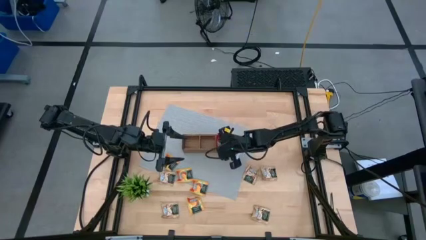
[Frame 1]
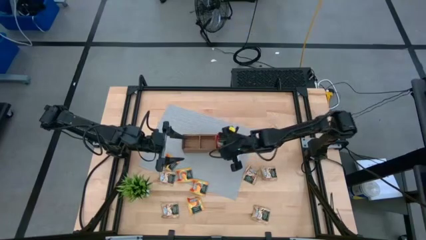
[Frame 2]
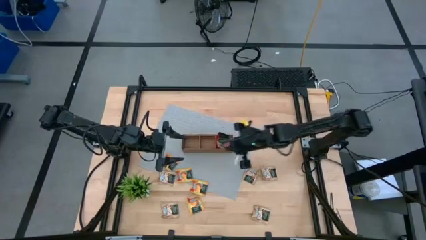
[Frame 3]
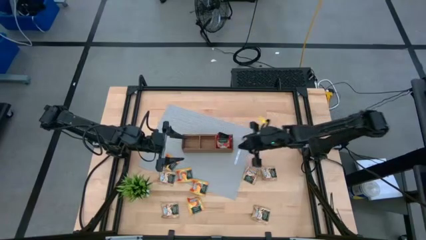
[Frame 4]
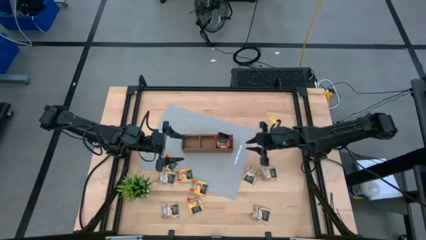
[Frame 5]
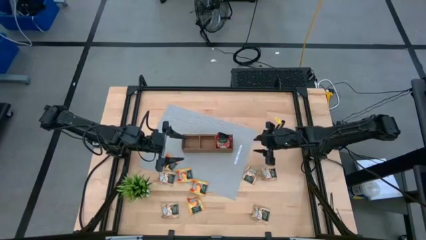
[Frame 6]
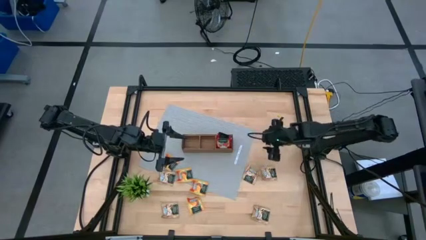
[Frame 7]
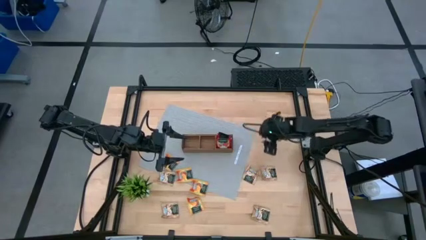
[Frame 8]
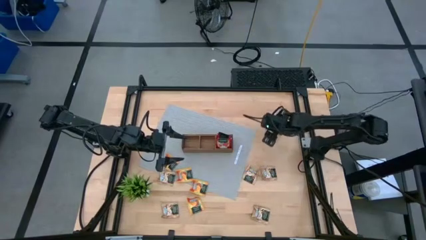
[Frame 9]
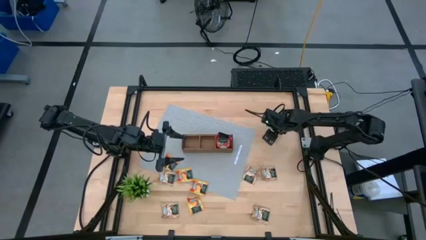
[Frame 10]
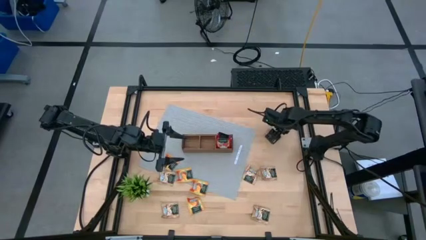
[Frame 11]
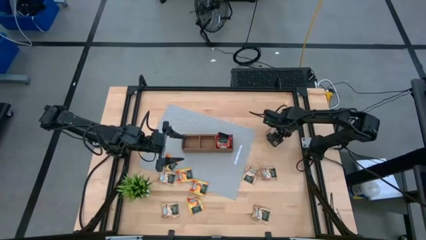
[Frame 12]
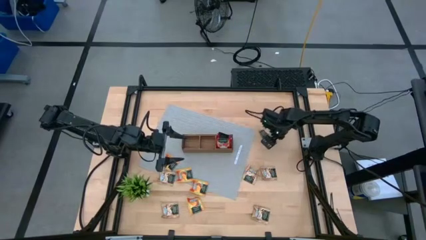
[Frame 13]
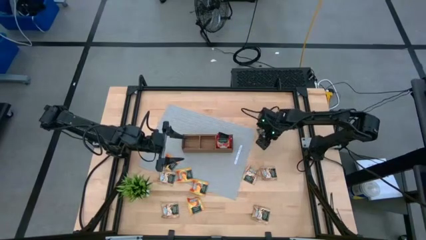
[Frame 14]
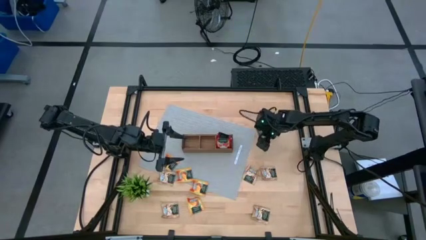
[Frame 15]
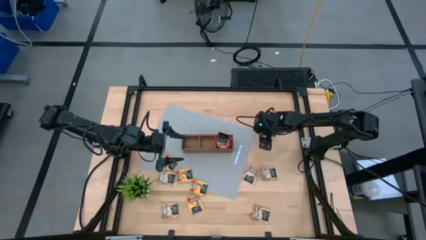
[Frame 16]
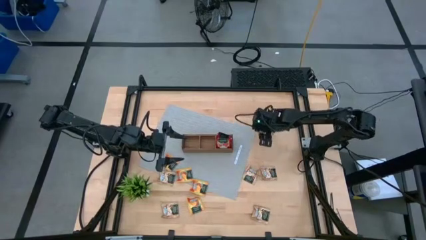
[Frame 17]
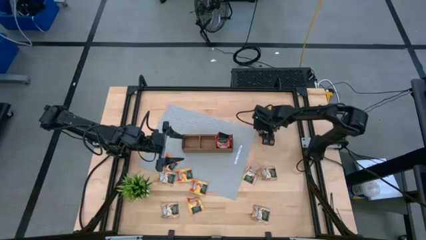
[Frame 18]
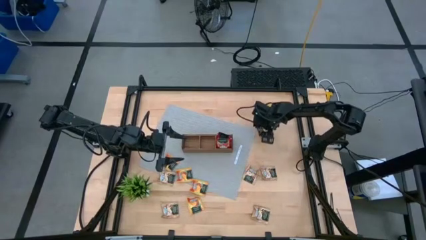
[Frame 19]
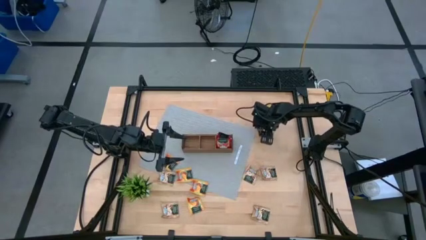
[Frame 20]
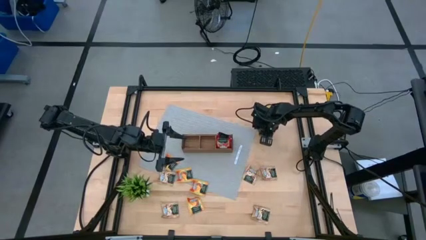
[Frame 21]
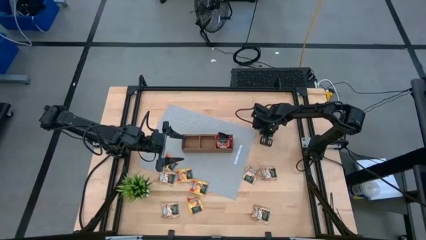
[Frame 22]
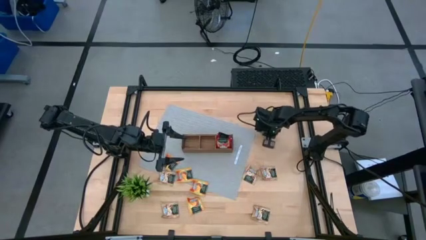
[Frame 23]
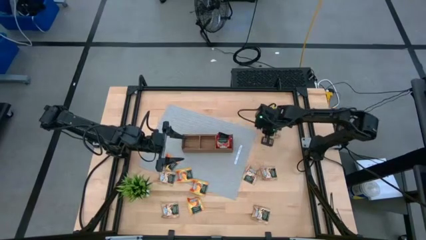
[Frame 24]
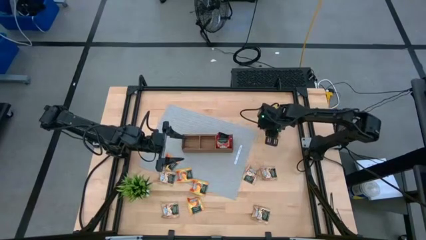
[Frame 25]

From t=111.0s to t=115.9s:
Task: Pick & Place Tea
Put the brown tea bag into the wooden organizer

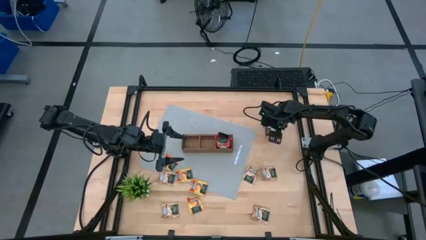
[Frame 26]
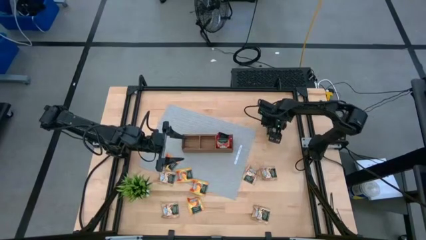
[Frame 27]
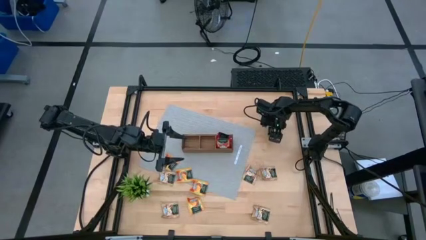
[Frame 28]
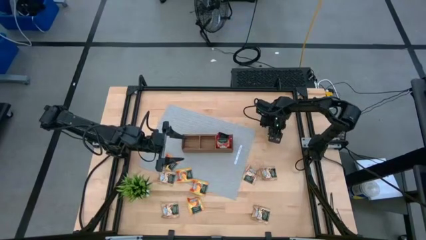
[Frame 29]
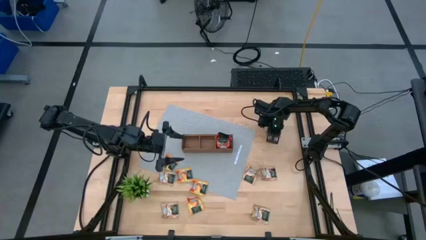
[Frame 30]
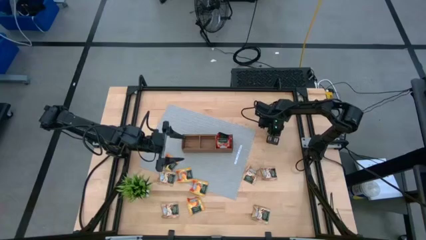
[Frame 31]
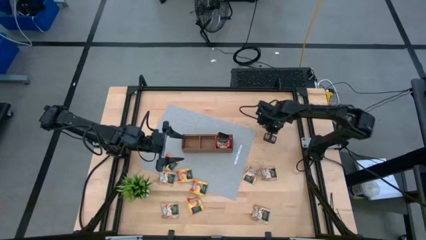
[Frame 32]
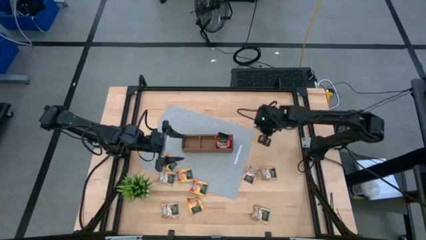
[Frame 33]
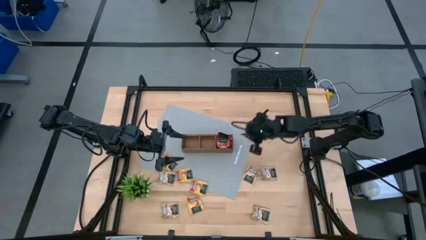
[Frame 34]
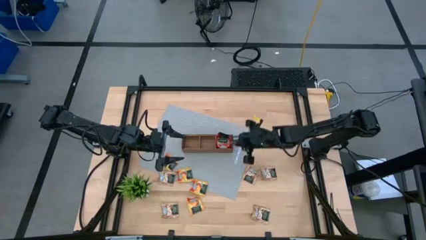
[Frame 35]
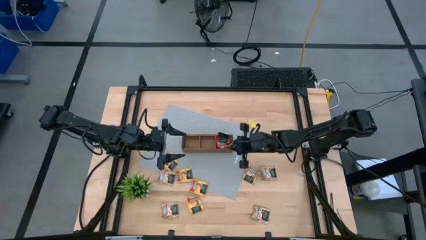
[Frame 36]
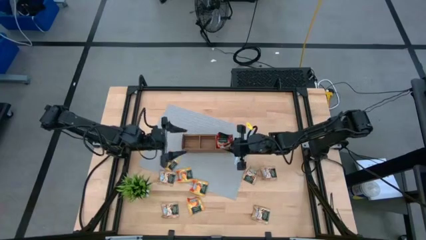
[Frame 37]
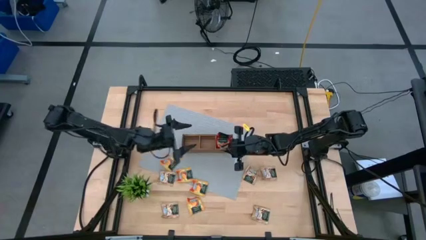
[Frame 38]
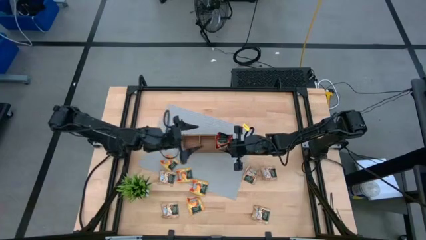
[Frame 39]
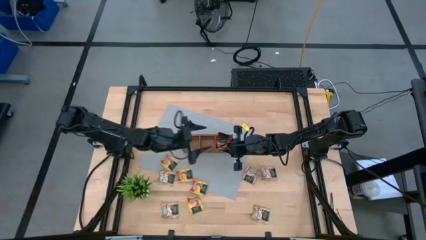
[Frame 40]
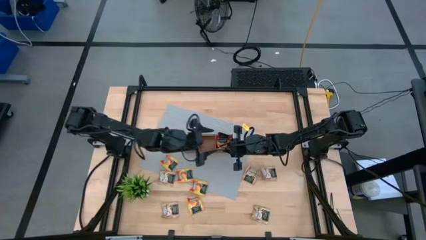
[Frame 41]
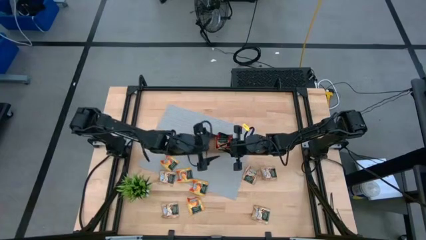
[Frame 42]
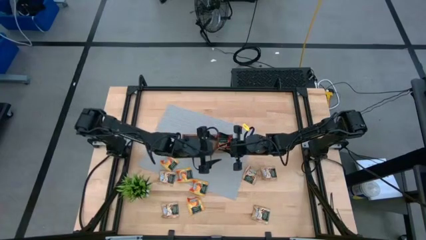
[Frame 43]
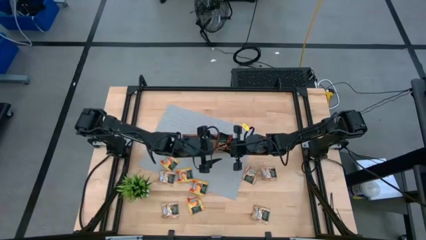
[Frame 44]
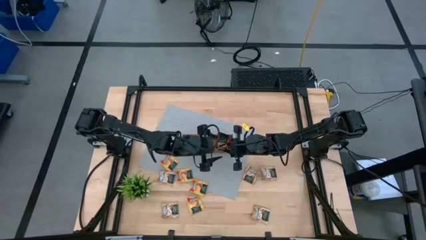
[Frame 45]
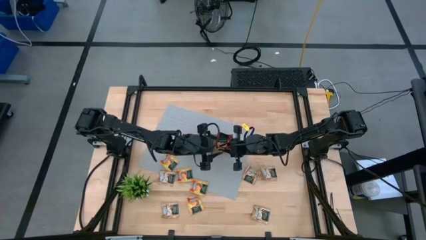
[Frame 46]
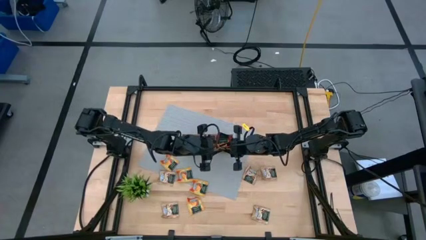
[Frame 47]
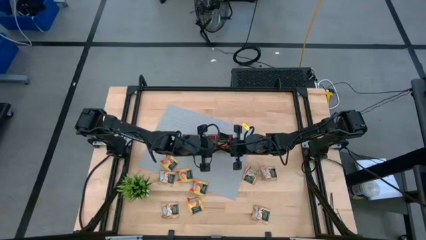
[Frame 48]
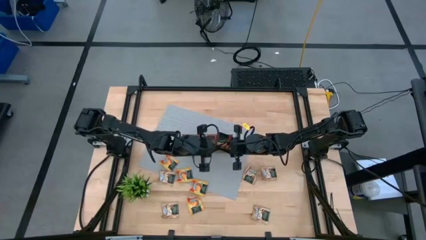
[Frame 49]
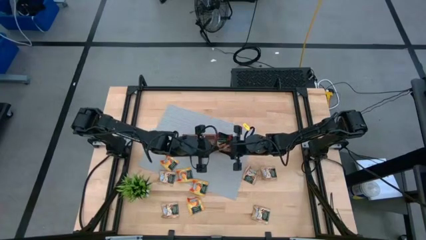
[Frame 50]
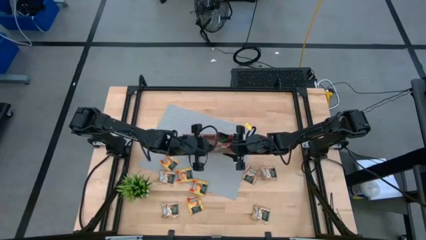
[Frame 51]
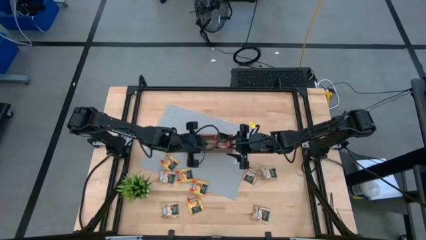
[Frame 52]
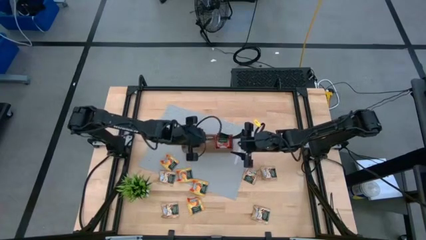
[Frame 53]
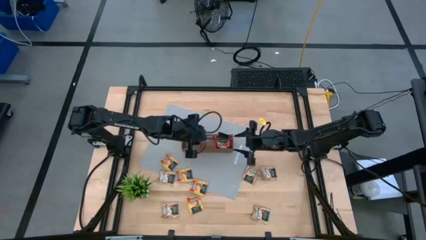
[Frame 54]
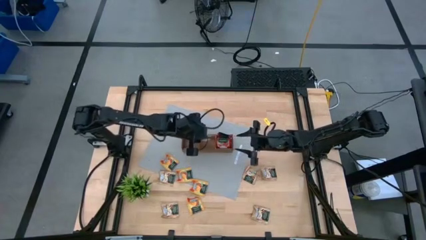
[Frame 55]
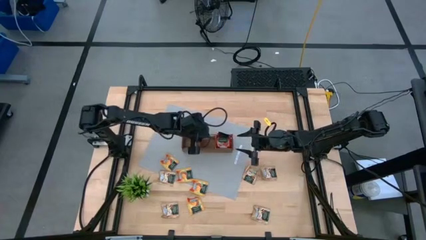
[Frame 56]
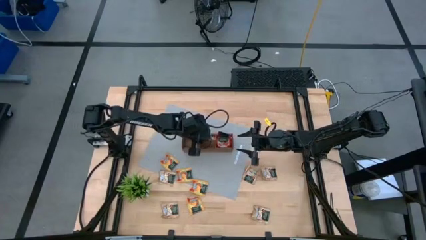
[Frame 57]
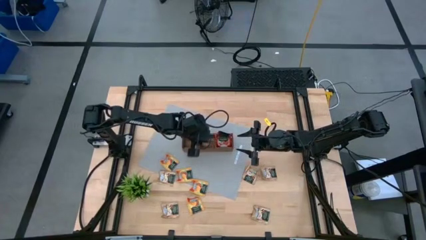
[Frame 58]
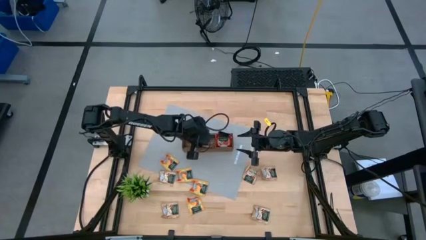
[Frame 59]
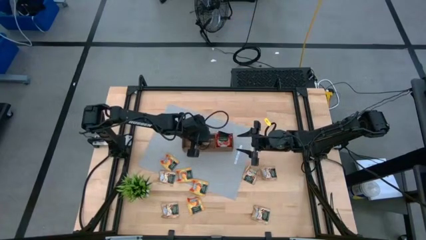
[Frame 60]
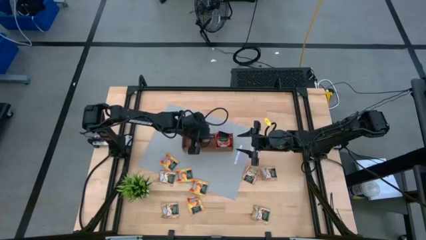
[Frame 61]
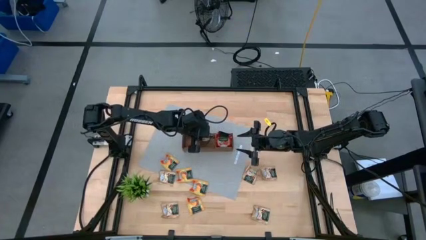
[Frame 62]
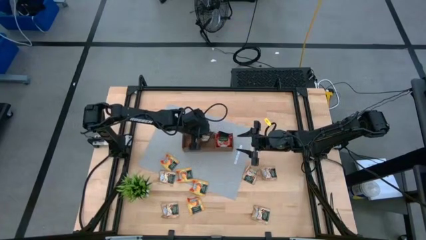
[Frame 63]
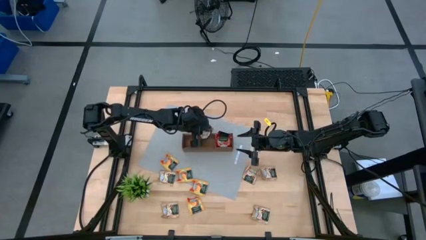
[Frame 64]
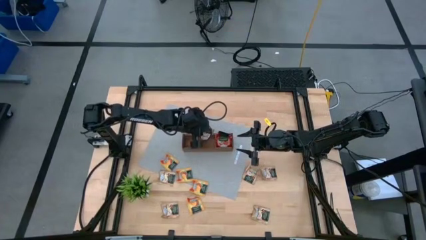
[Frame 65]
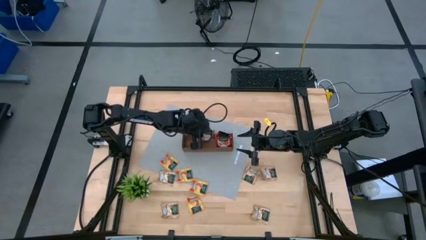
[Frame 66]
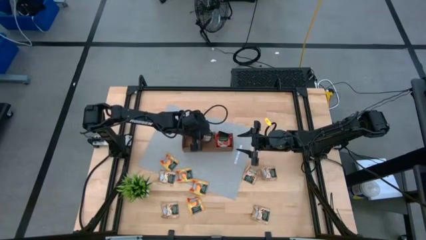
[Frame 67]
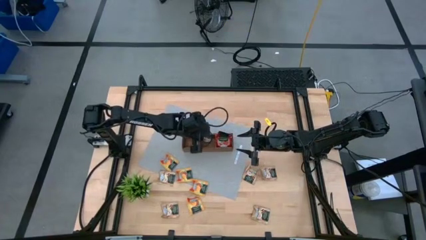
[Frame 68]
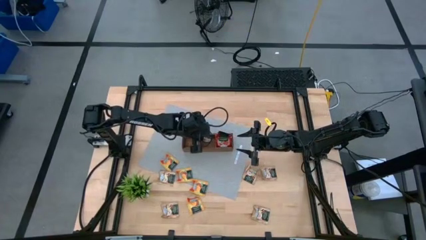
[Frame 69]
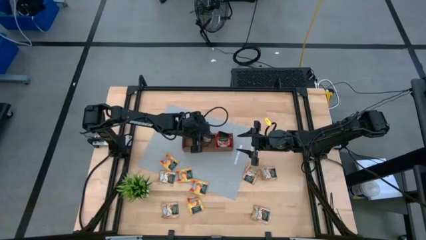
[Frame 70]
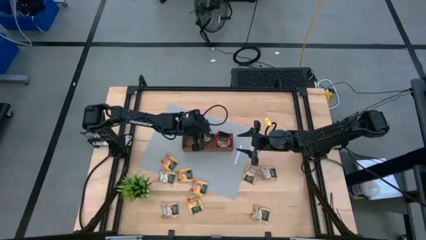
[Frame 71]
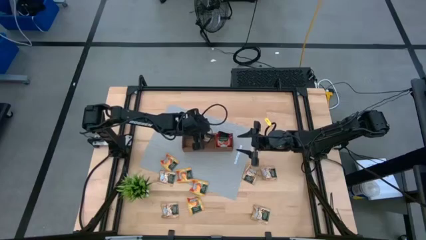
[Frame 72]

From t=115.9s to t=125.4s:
Put the brown tea bag into the wooden organizer

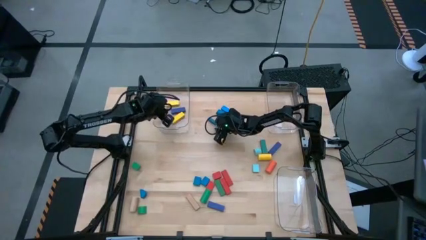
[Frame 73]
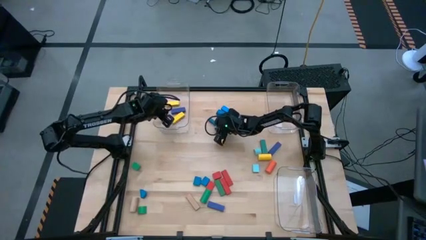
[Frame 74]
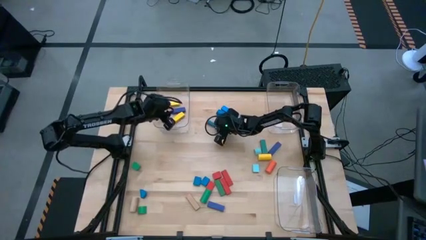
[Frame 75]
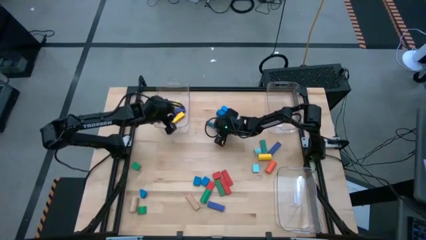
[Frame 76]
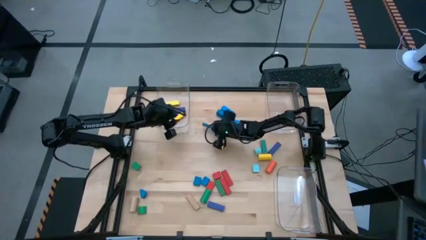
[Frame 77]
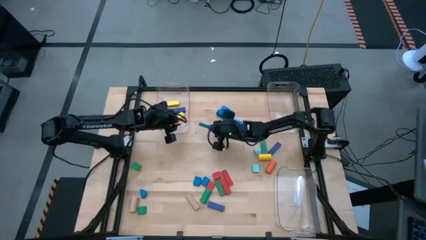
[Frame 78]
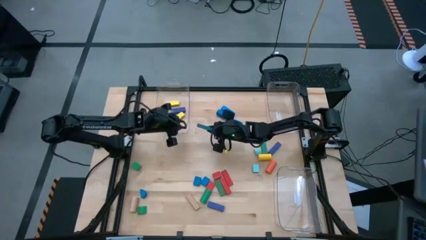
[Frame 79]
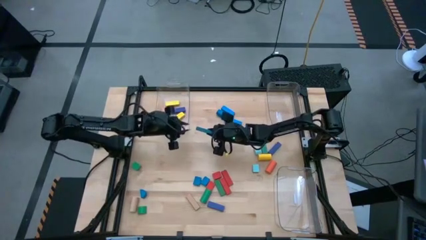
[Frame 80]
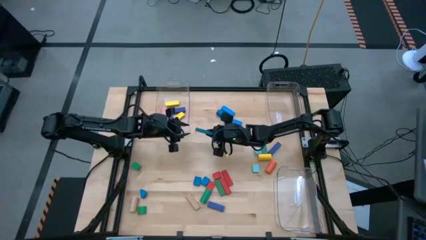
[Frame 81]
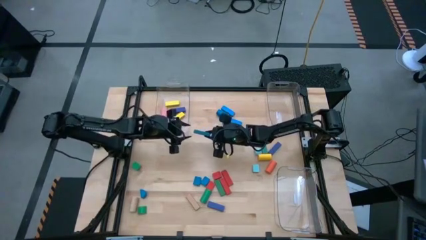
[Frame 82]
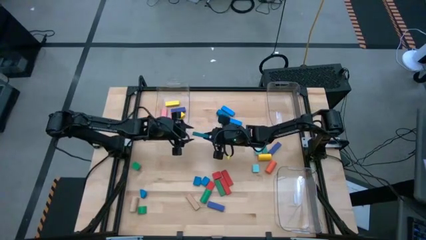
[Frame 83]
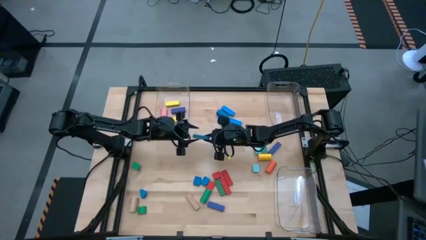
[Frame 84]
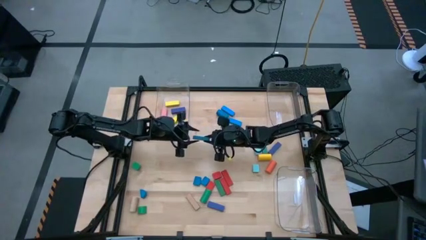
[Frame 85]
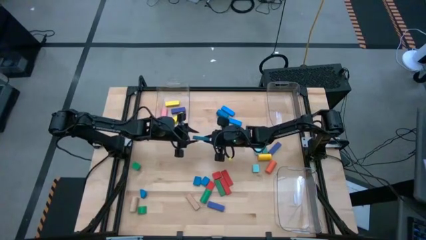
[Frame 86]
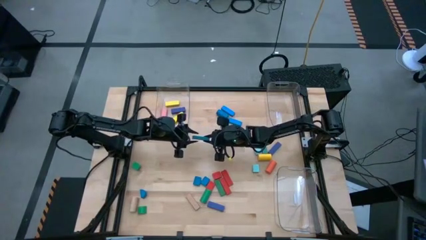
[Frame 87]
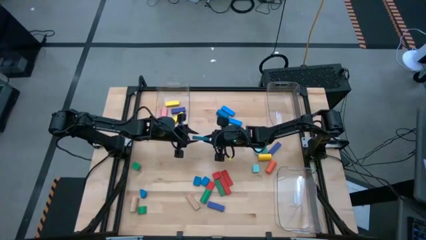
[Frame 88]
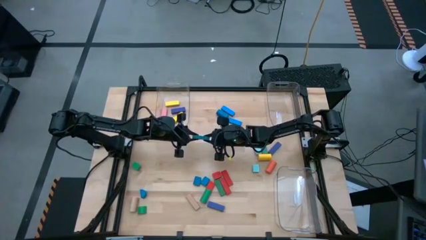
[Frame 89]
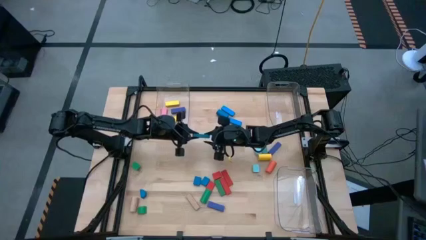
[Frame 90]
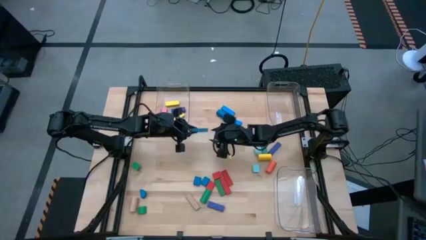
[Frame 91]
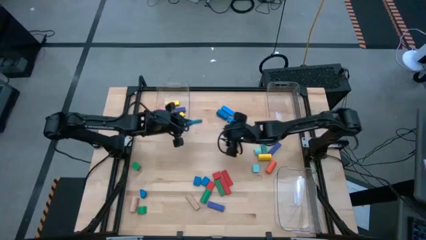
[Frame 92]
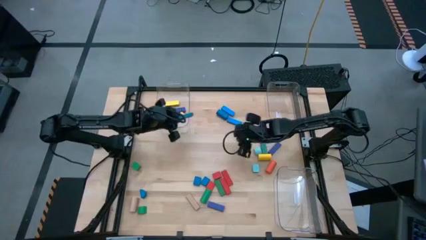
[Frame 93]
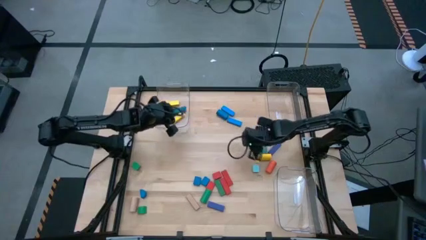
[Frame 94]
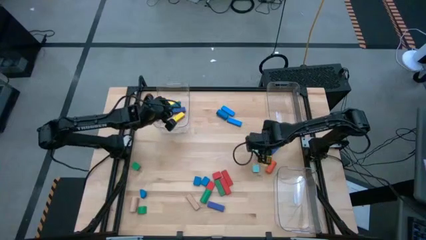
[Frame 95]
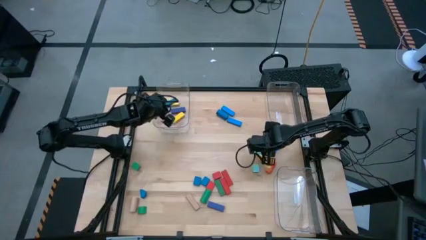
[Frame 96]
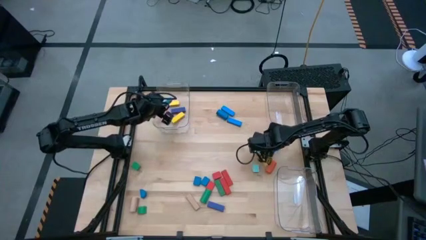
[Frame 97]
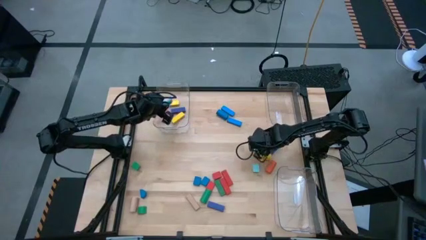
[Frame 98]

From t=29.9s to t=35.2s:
Task: Sort blocks by size
Put the blue rectangle block into the top left transparent bin
